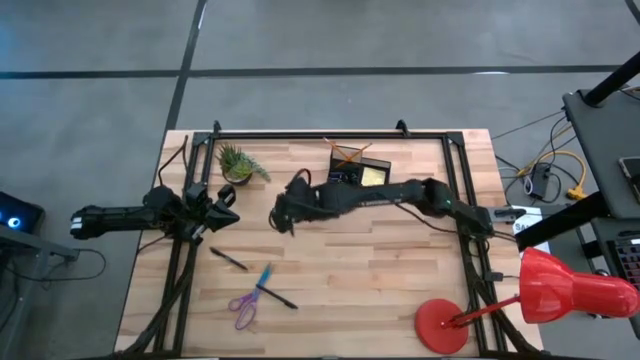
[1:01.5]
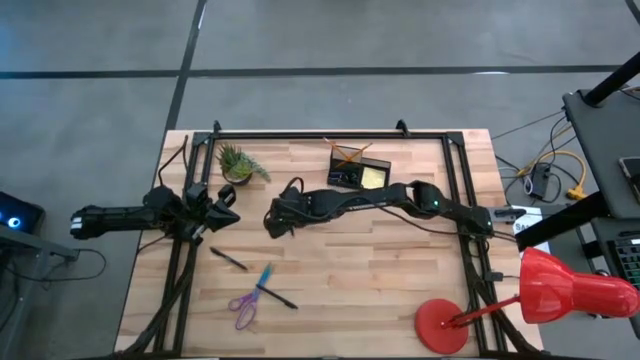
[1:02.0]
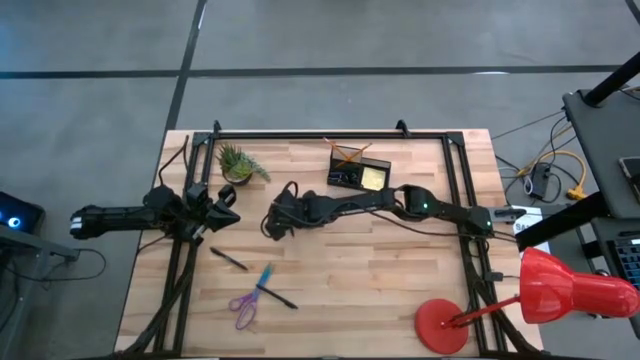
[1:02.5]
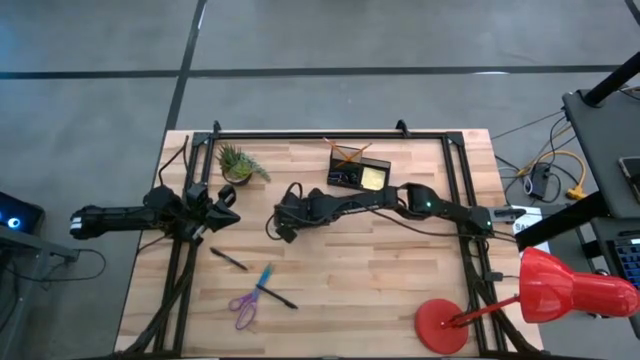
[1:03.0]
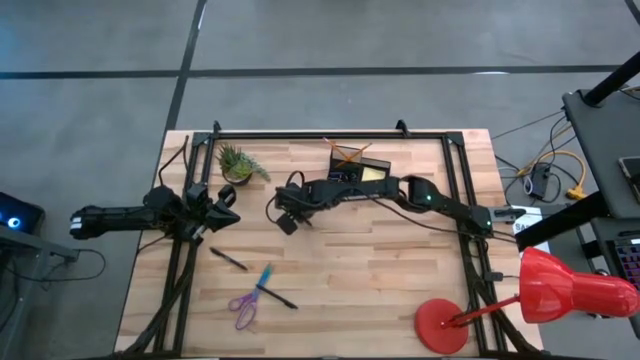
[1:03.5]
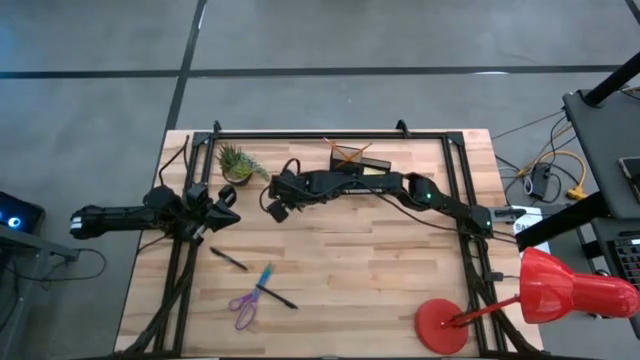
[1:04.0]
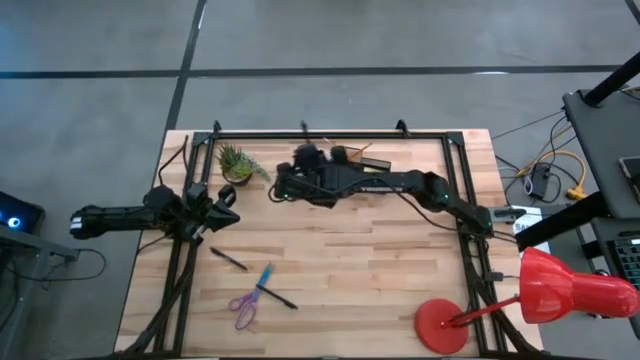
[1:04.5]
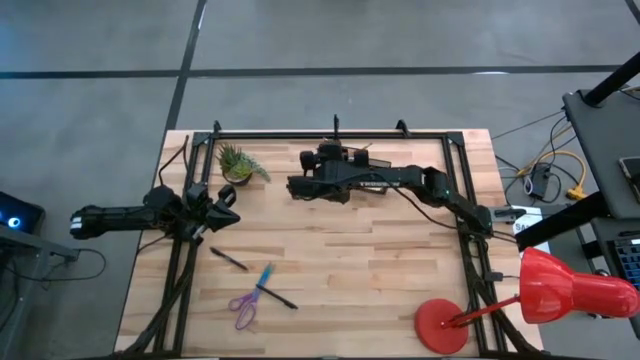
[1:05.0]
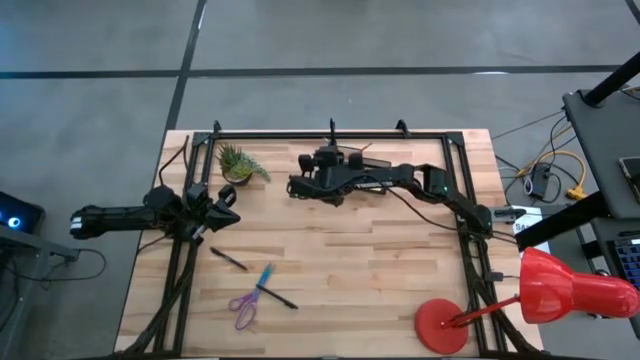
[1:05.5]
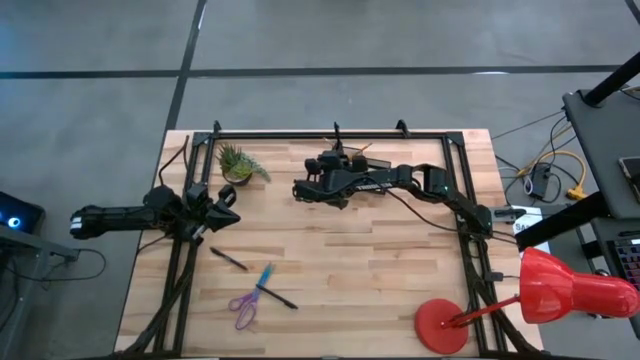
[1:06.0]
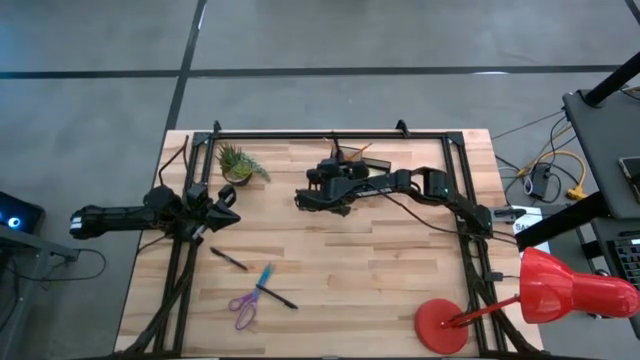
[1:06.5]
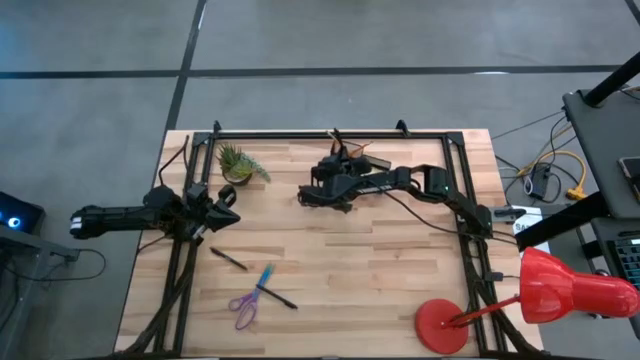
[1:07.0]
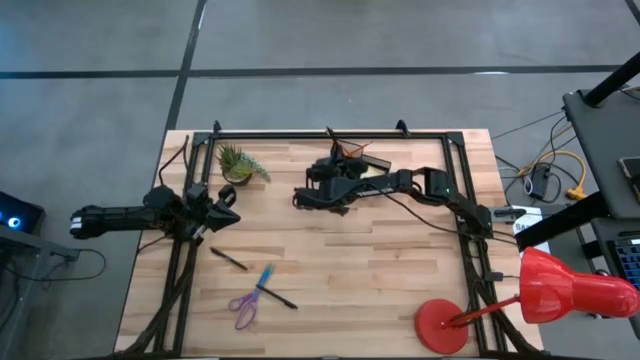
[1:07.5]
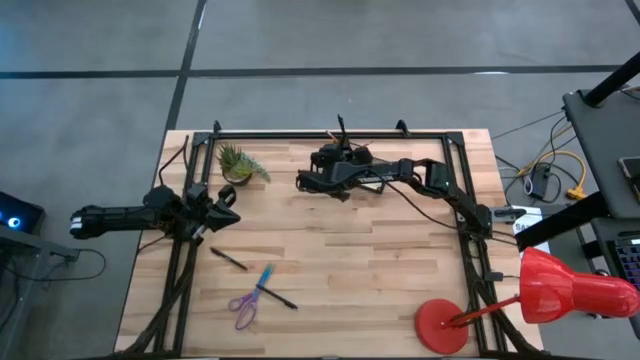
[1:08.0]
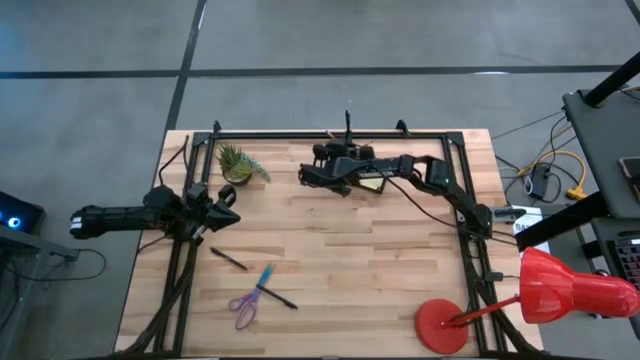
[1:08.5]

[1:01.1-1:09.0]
Task: Pick and place office supplies into organizer
Put the top black pen into the black desk organizer

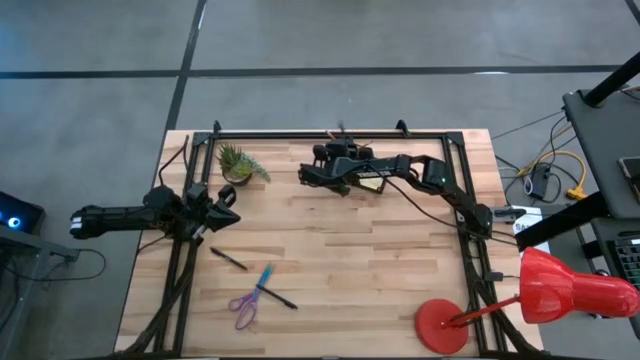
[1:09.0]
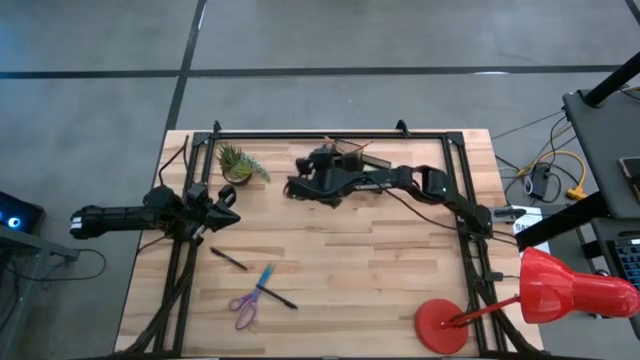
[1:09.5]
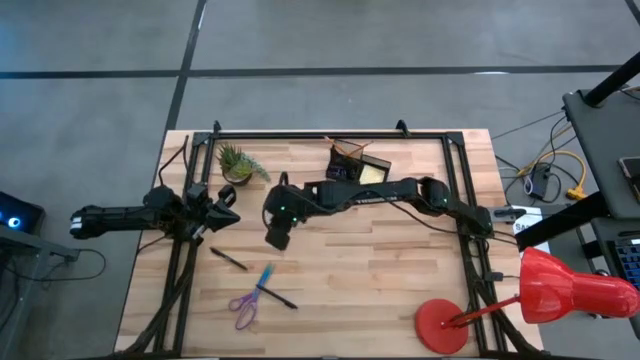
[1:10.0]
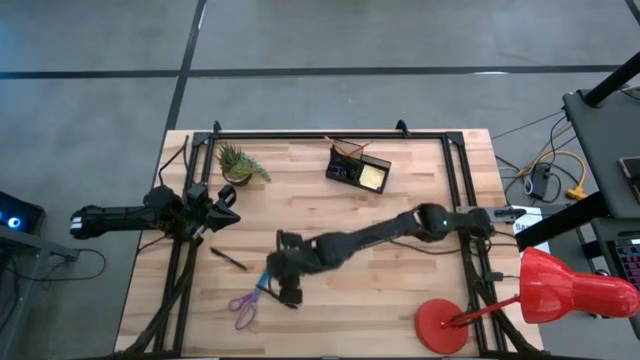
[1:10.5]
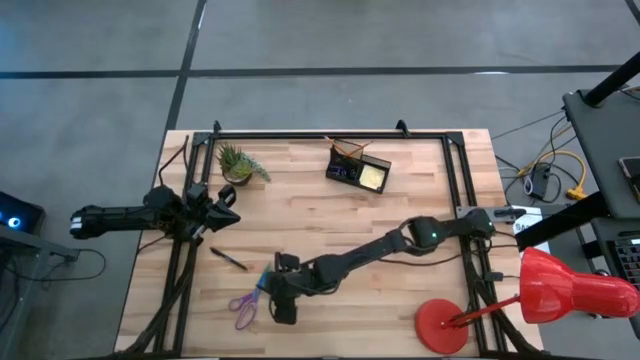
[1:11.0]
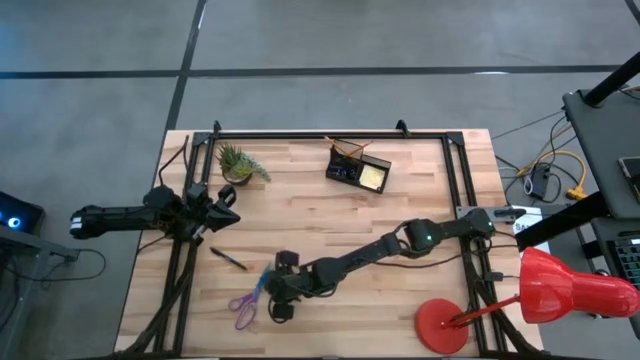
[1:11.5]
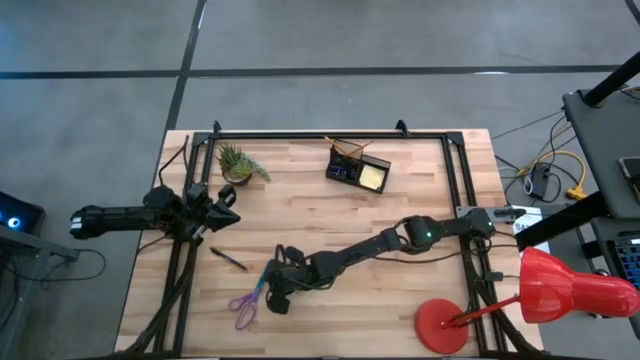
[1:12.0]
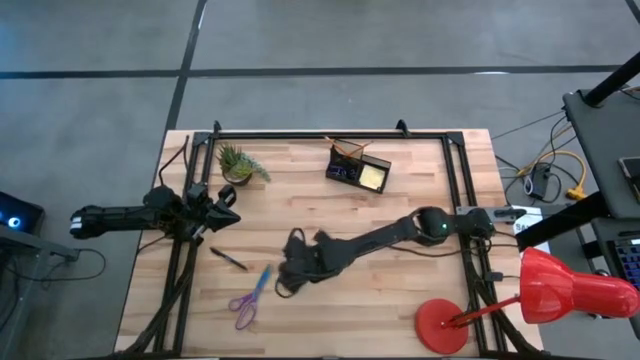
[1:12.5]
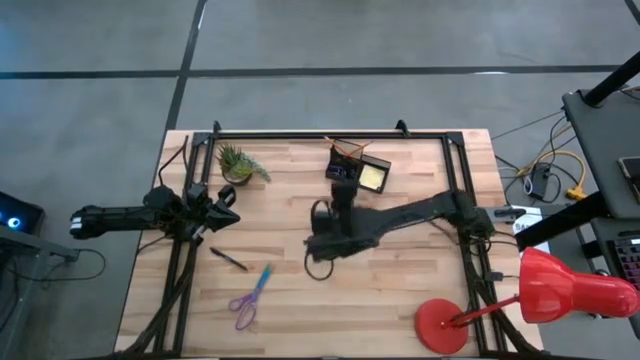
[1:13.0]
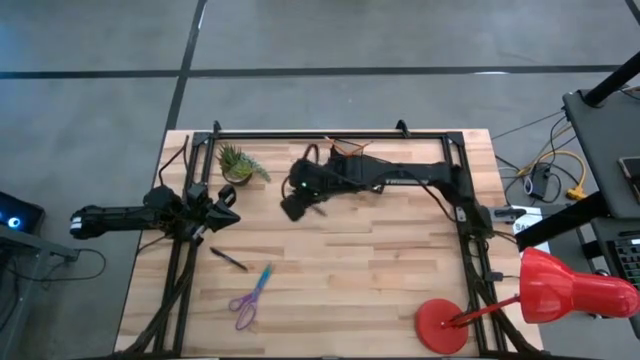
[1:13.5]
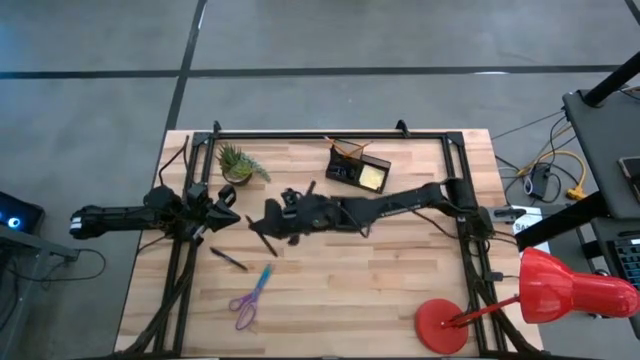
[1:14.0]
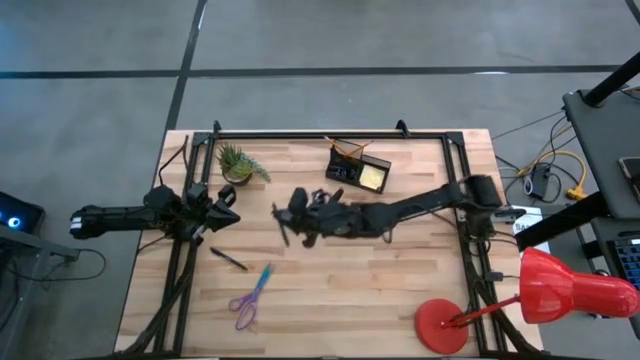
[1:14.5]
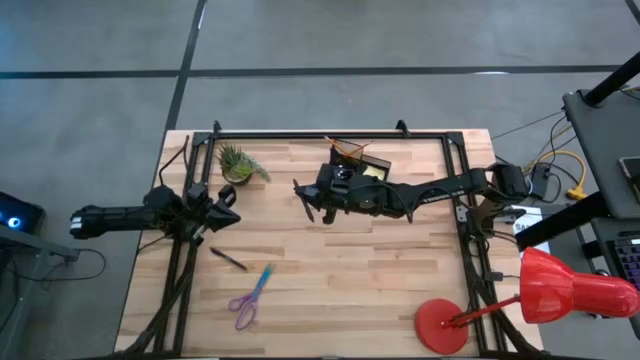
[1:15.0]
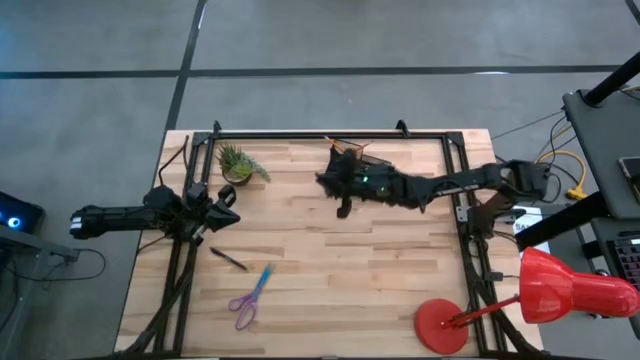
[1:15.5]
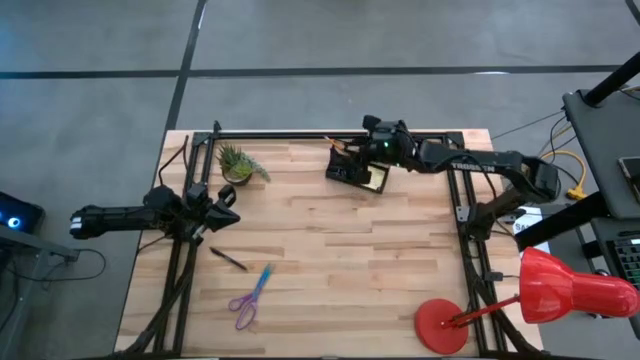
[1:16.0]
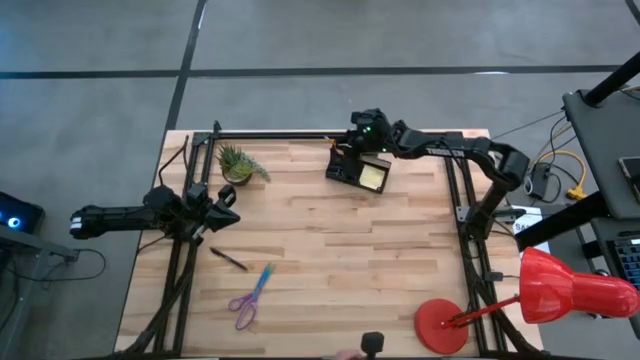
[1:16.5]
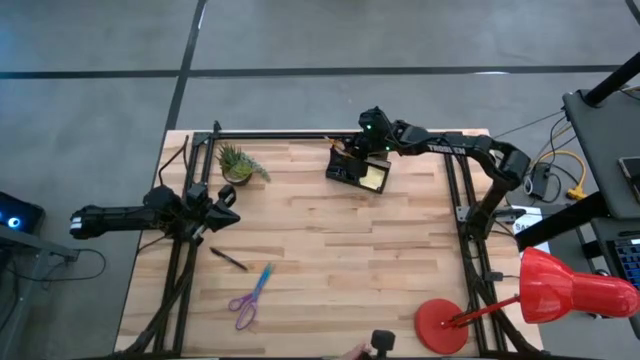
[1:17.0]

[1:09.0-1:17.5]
Put the bottom black pen into the black desk organizer

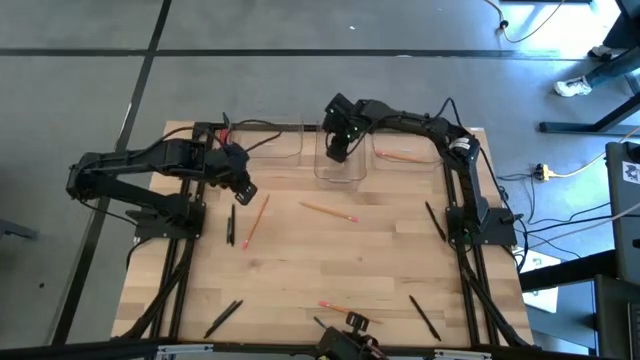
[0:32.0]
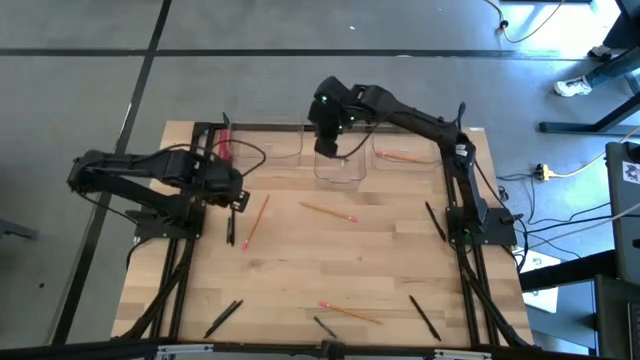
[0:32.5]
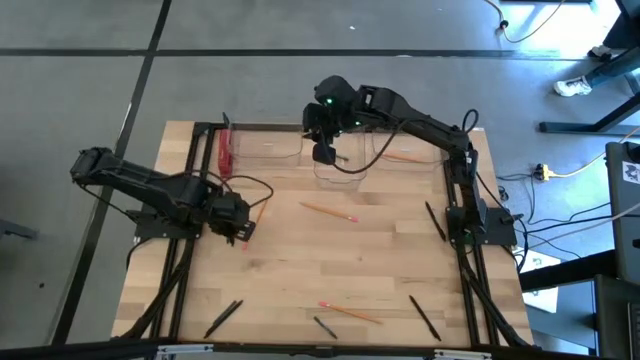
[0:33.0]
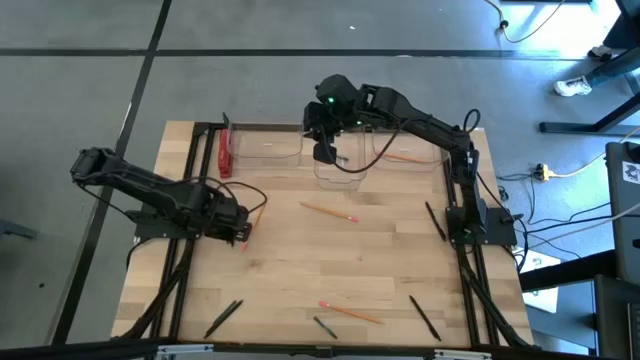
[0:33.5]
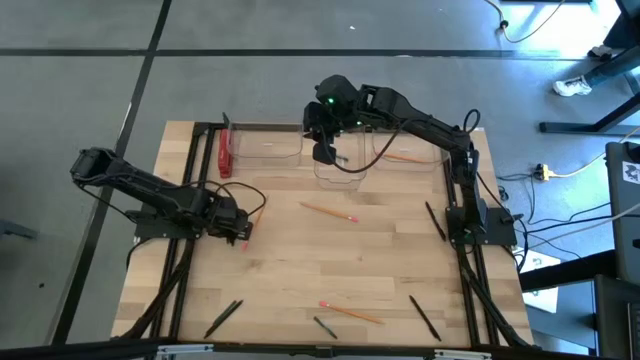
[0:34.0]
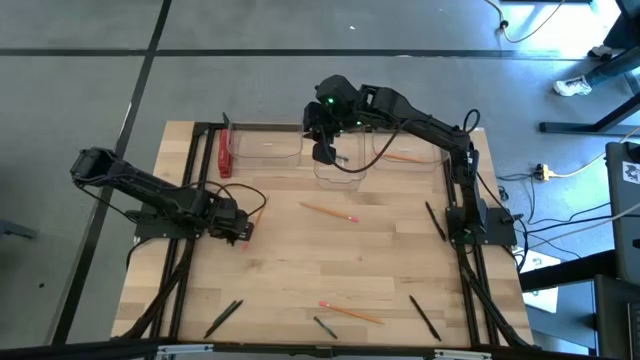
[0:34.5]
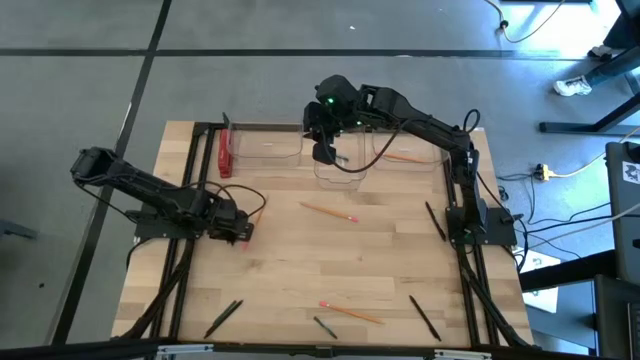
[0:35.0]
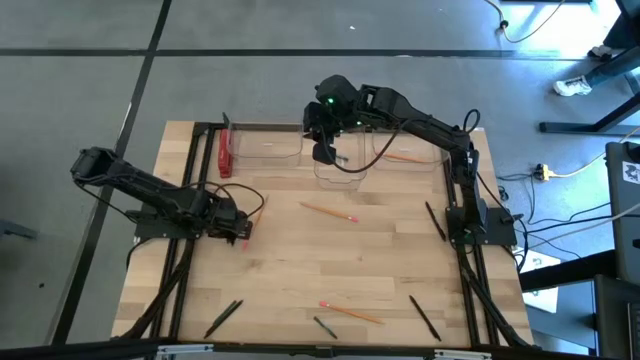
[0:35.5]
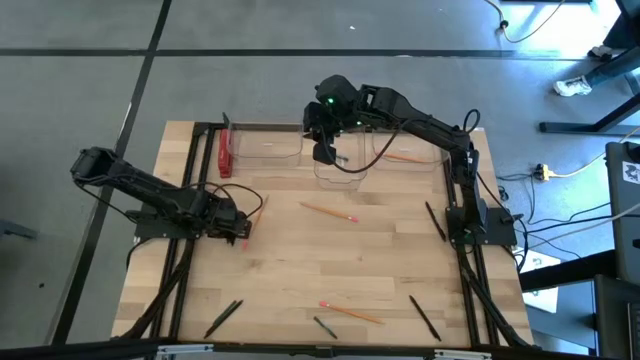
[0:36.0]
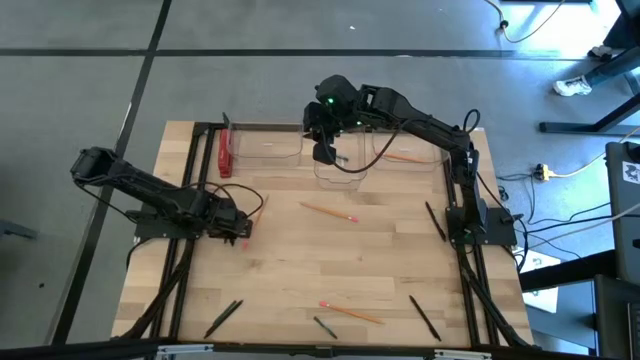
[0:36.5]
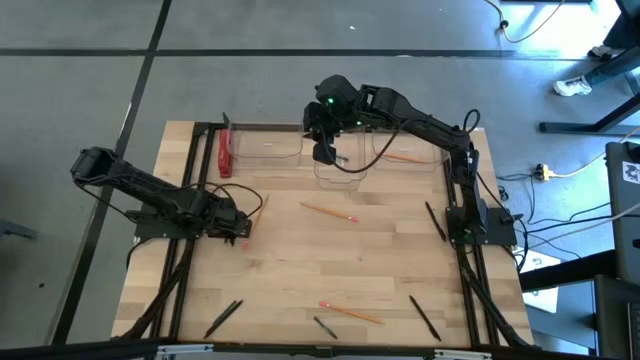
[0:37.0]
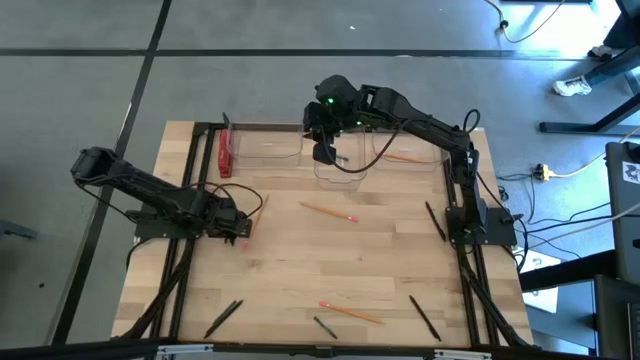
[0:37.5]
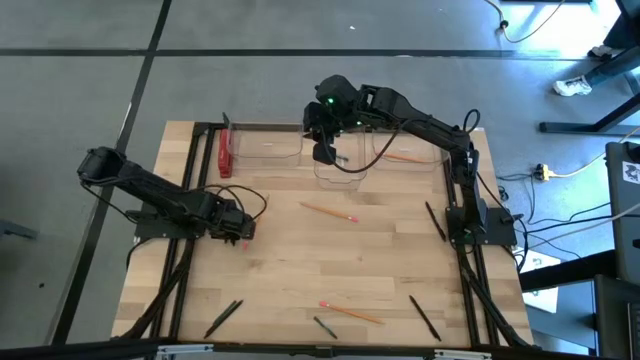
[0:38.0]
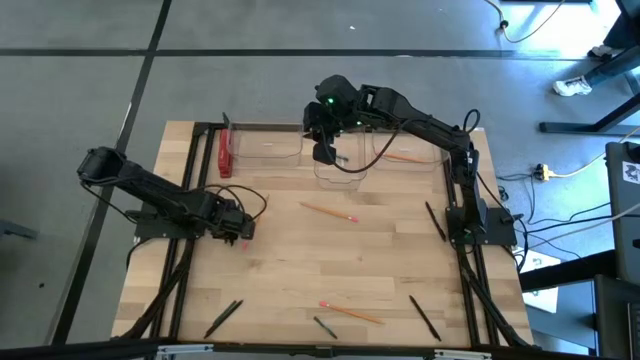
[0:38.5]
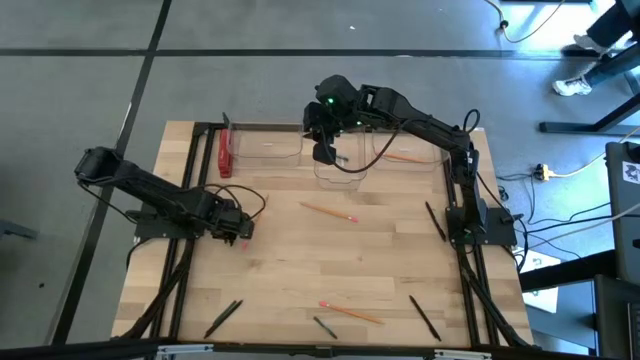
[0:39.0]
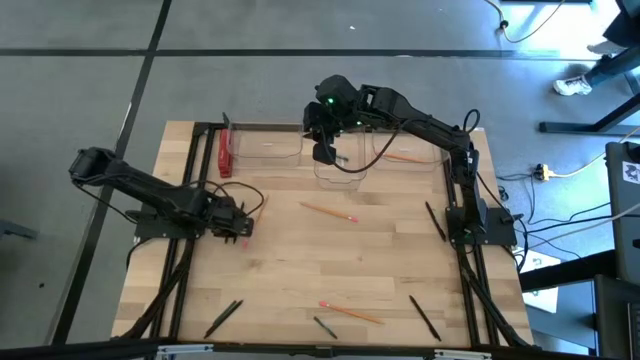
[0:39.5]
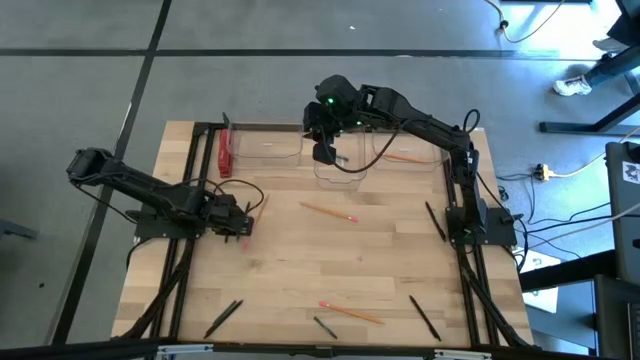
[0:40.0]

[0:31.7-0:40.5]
Task: Sort crayons/erasers/pens/pencils in bins
Put the black pen into the left transparent bin
